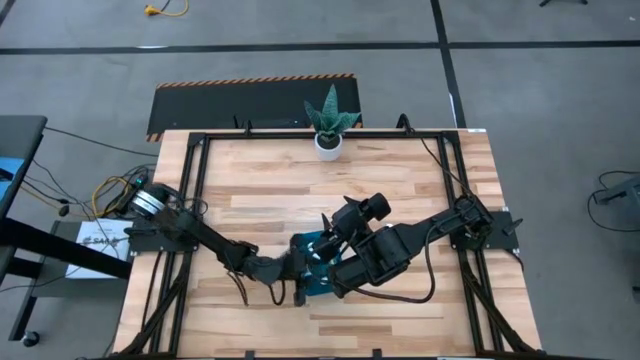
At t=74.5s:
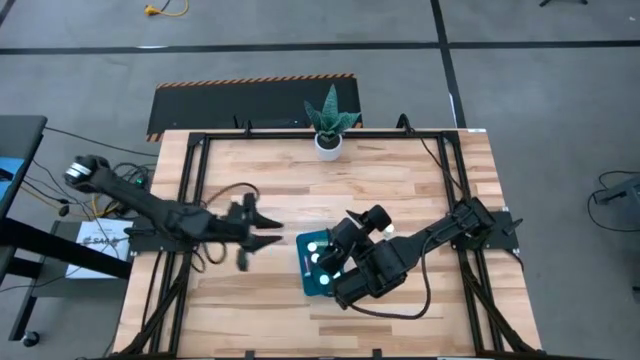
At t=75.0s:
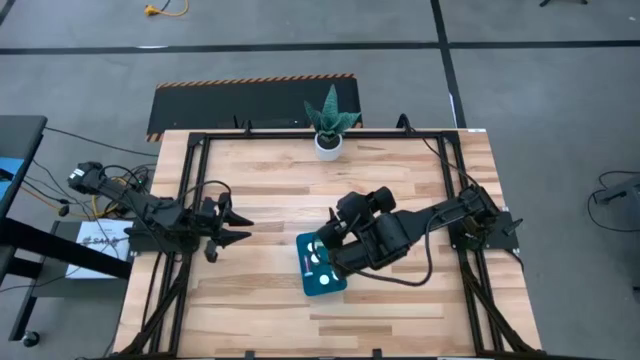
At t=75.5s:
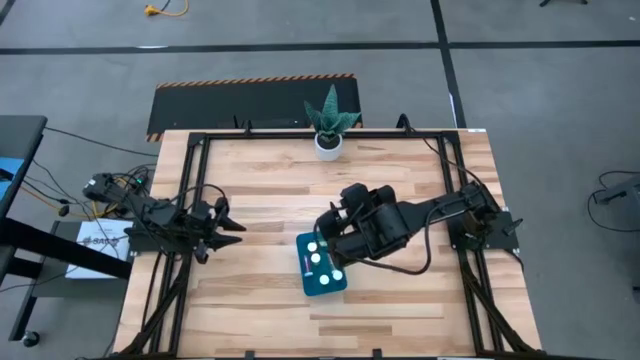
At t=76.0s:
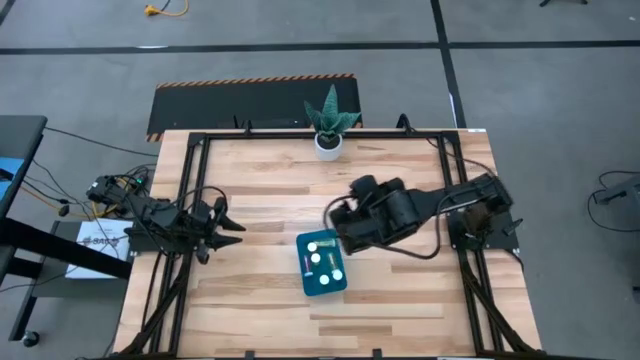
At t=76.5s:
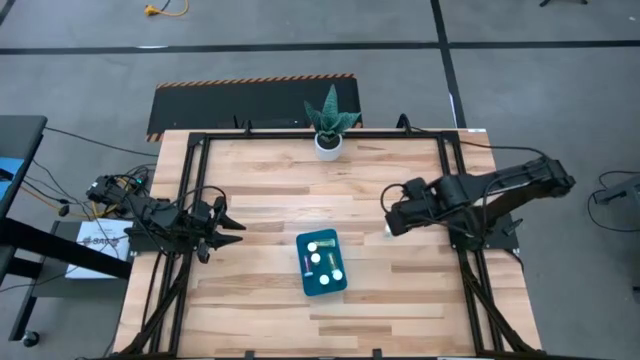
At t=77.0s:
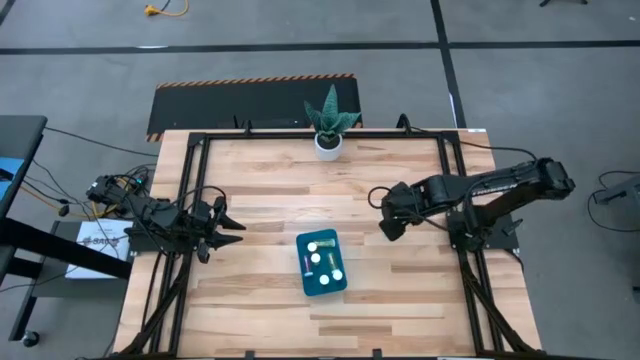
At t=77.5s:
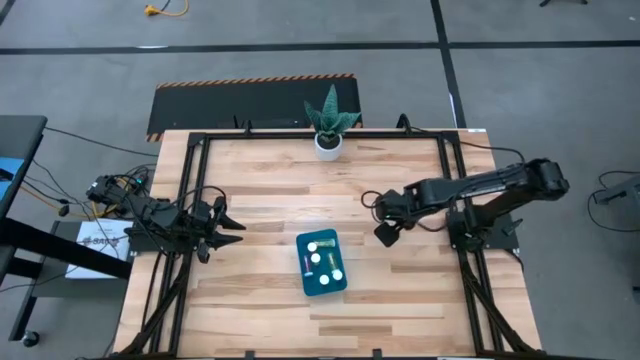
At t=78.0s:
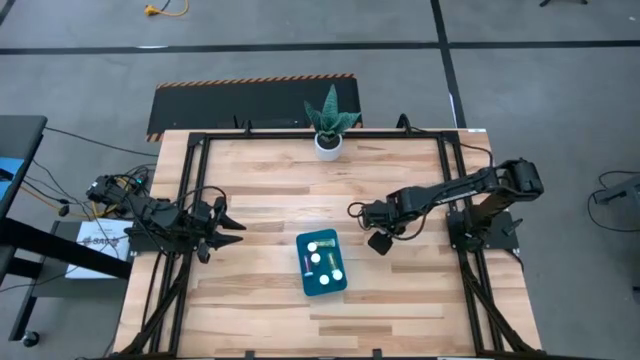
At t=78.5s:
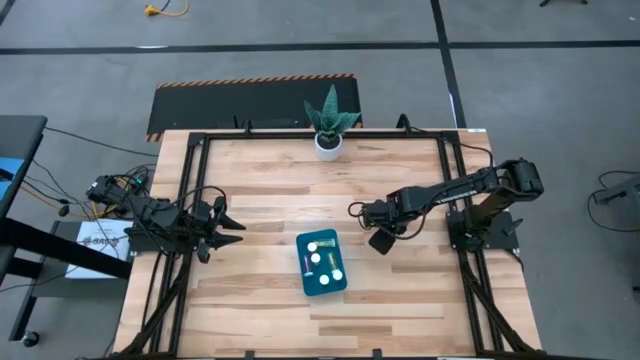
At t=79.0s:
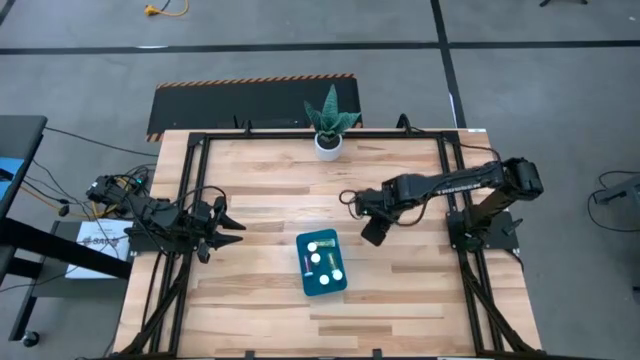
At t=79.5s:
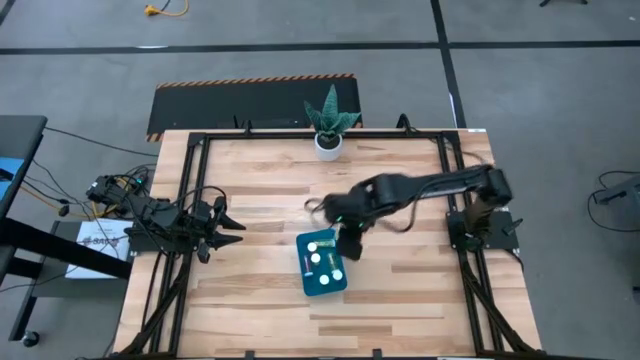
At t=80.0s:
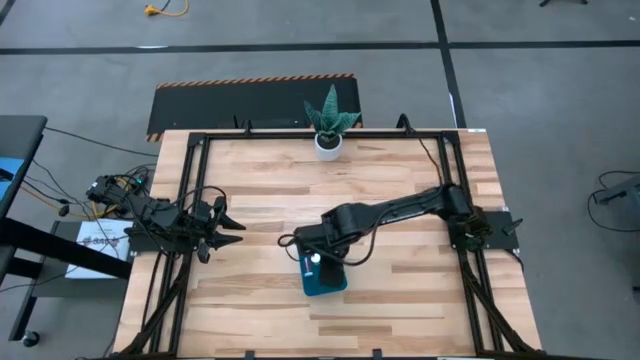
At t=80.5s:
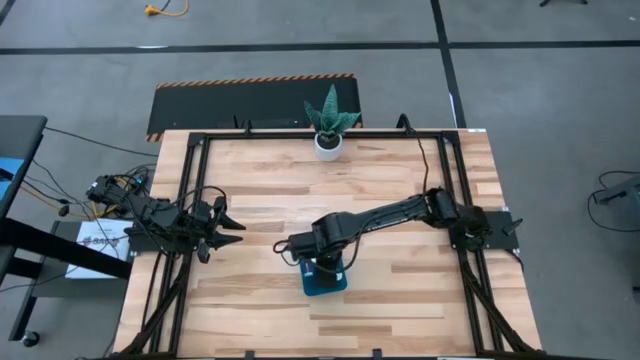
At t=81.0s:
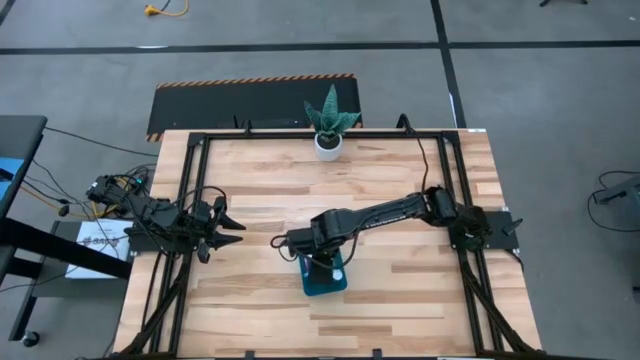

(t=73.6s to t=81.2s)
Task: Pick and place pill bottles into a basket
Put the blue pill bottle into the blue bin

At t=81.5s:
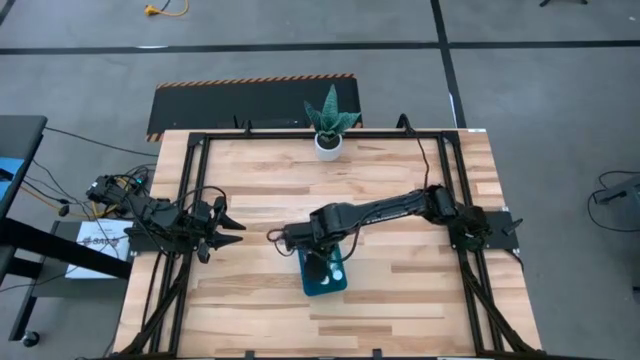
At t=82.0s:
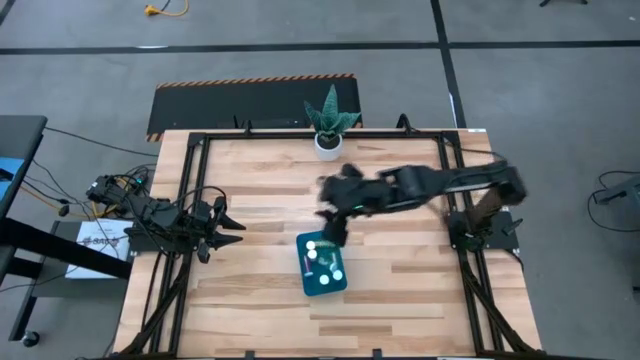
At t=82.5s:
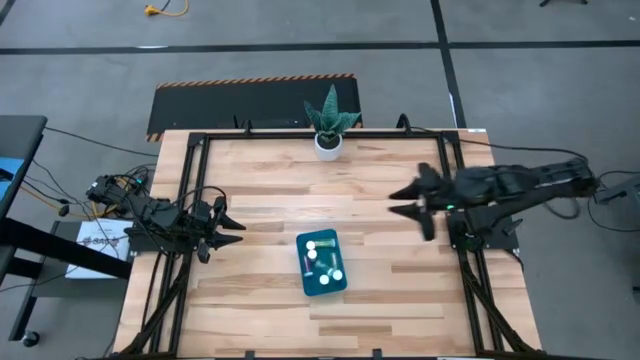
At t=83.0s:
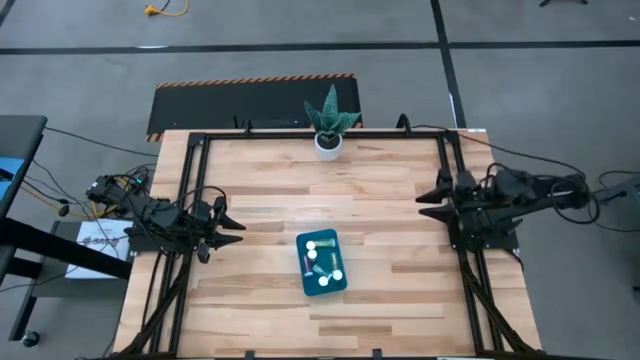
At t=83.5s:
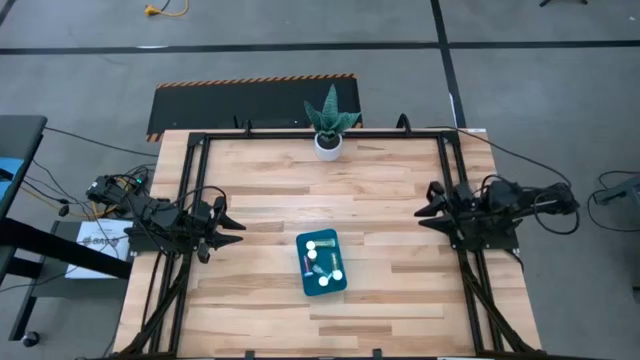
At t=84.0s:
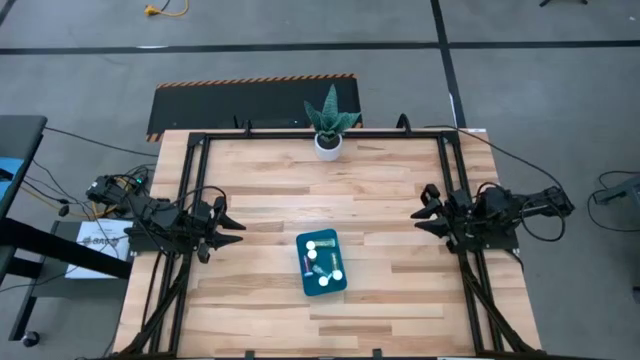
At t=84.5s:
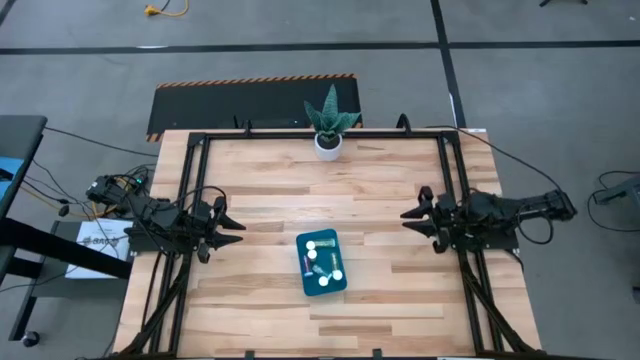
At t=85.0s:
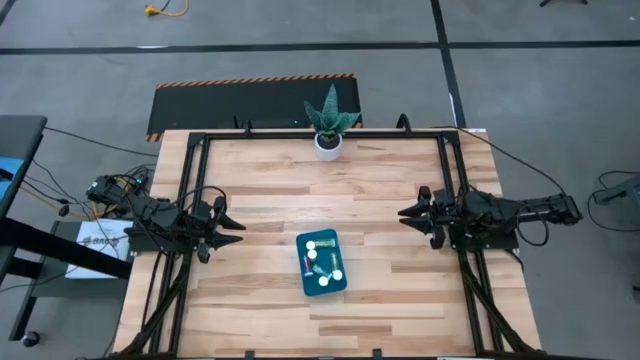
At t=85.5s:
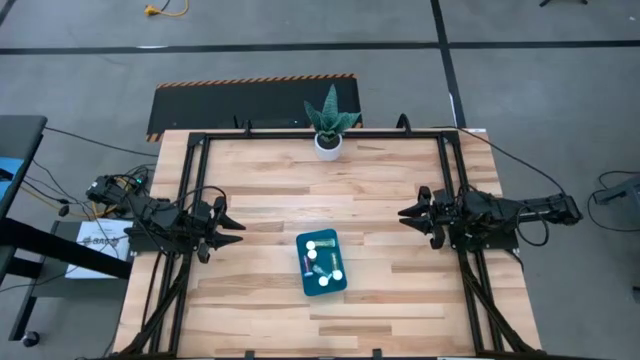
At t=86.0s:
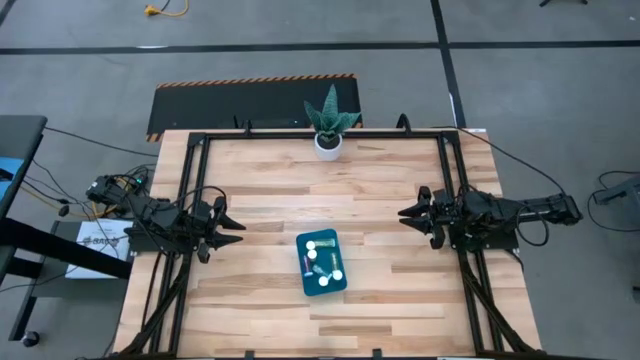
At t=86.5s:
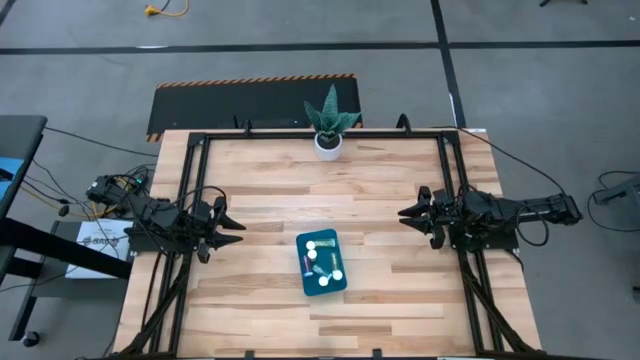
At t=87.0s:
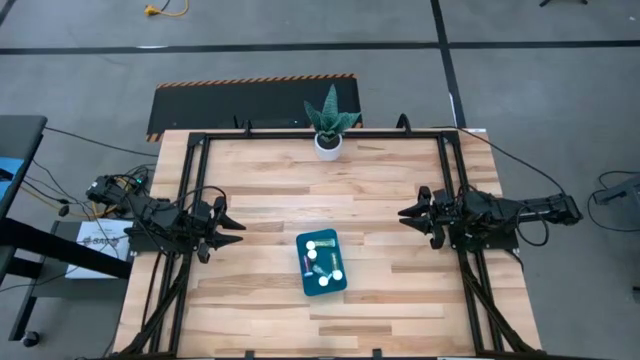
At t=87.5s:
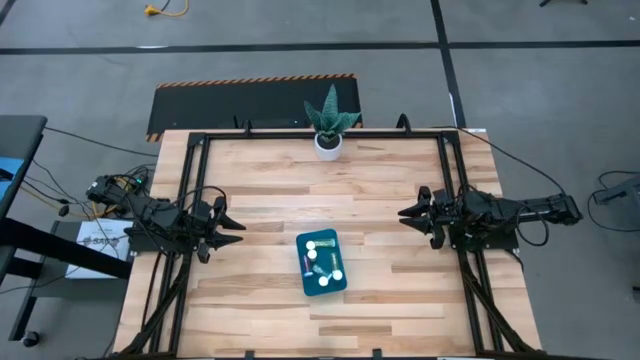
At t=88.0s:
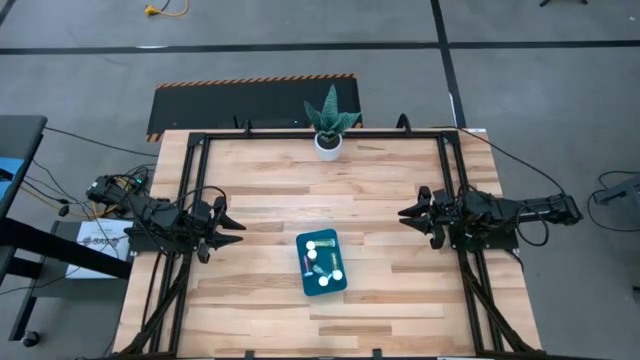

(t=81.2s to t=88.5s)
Return to Home Position

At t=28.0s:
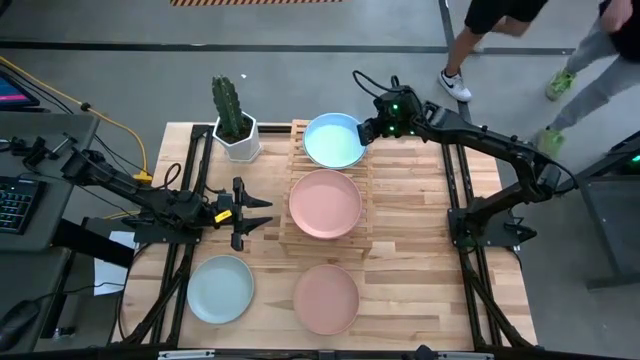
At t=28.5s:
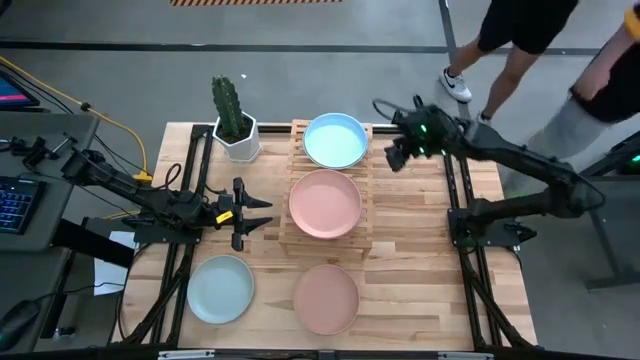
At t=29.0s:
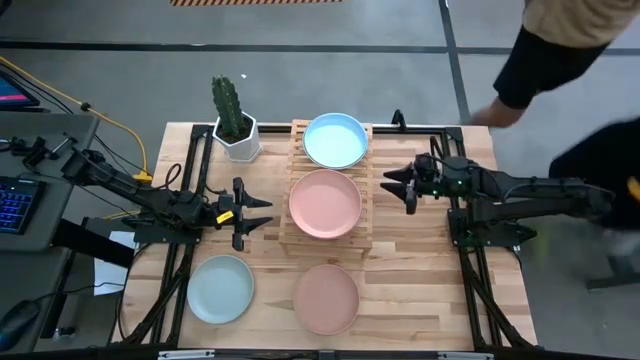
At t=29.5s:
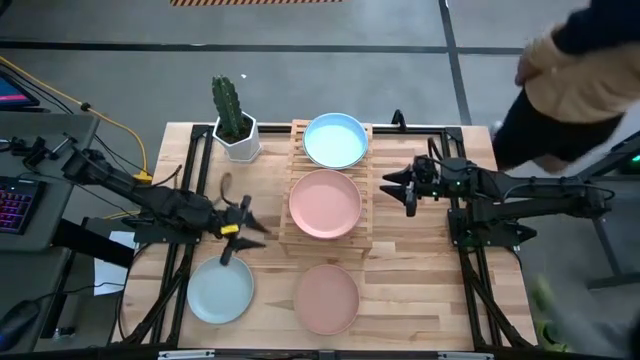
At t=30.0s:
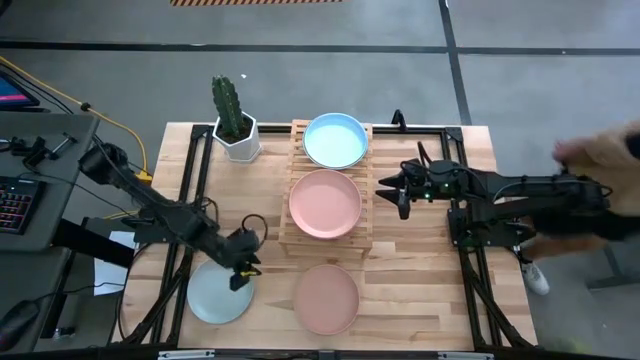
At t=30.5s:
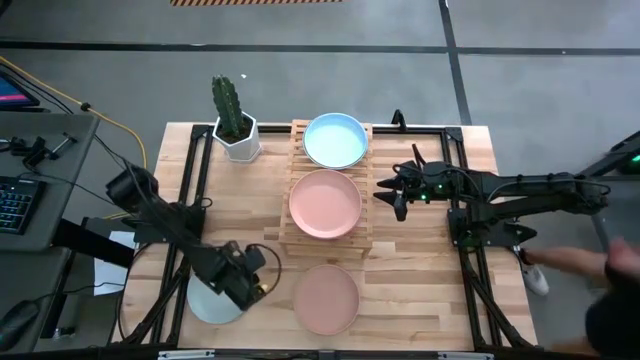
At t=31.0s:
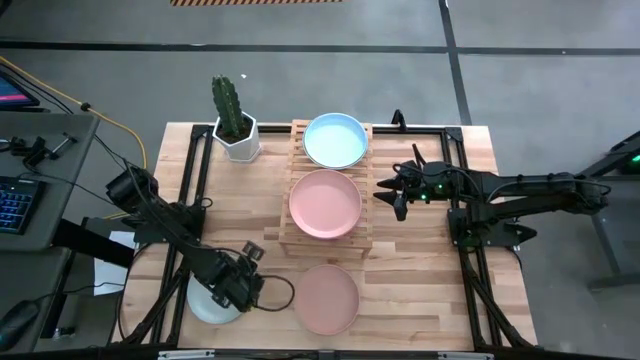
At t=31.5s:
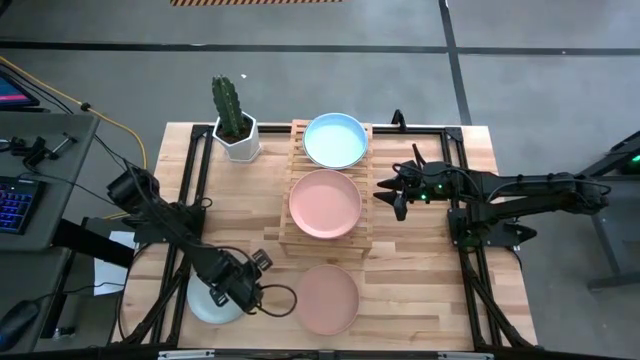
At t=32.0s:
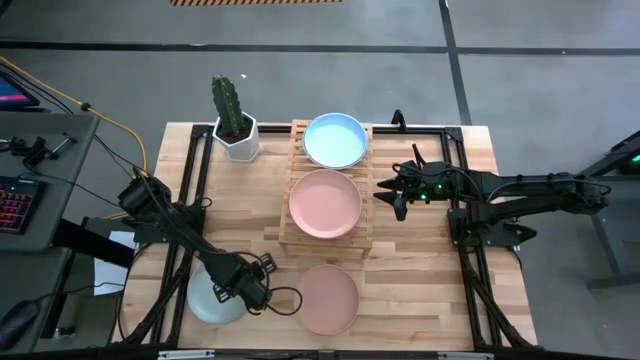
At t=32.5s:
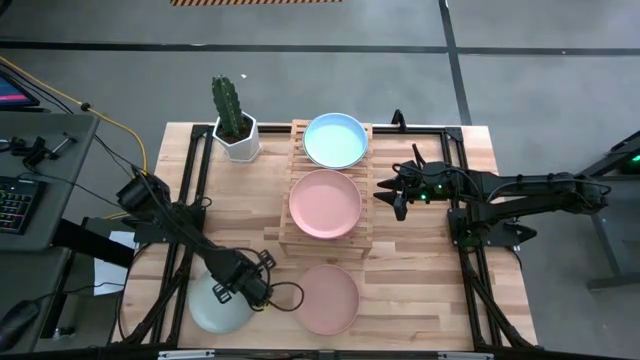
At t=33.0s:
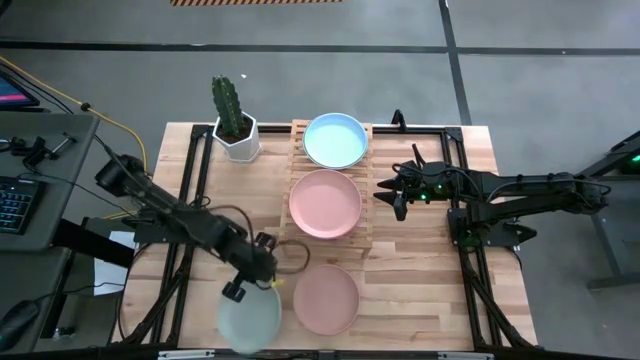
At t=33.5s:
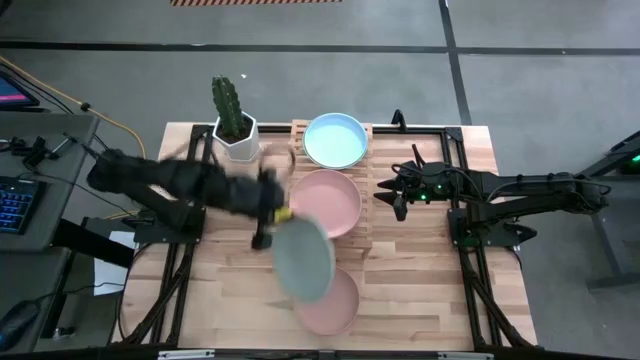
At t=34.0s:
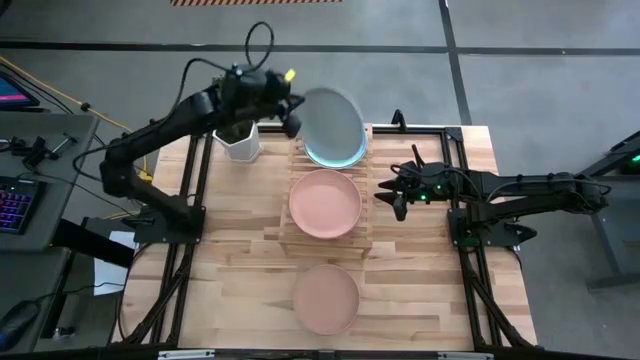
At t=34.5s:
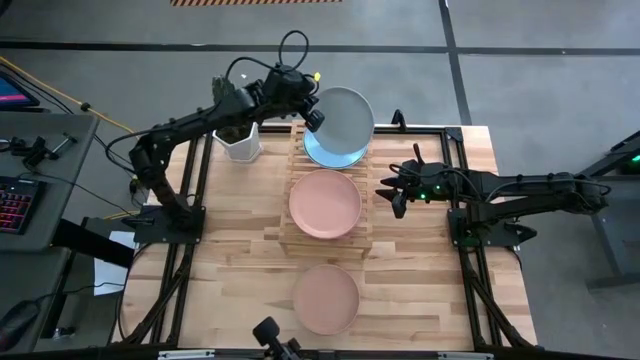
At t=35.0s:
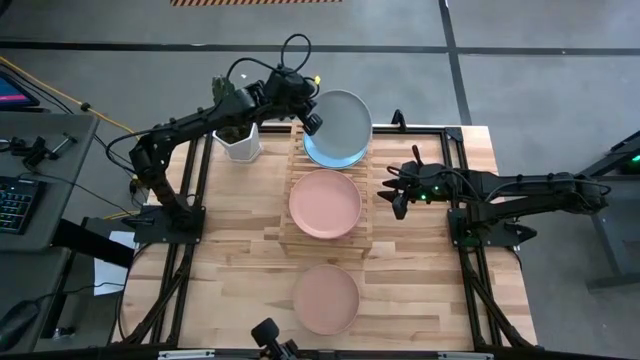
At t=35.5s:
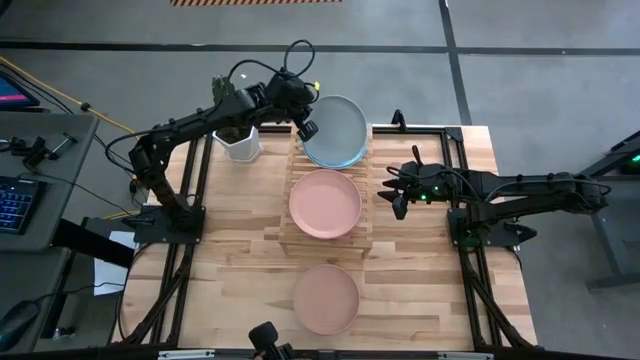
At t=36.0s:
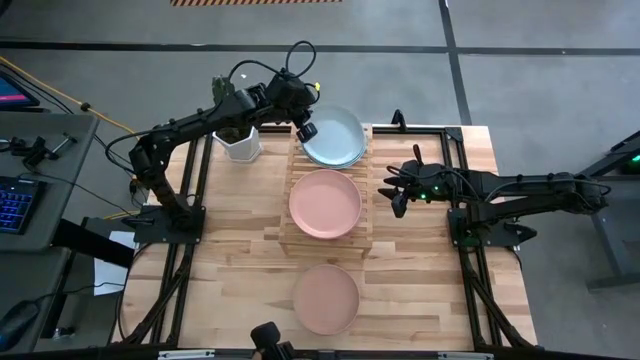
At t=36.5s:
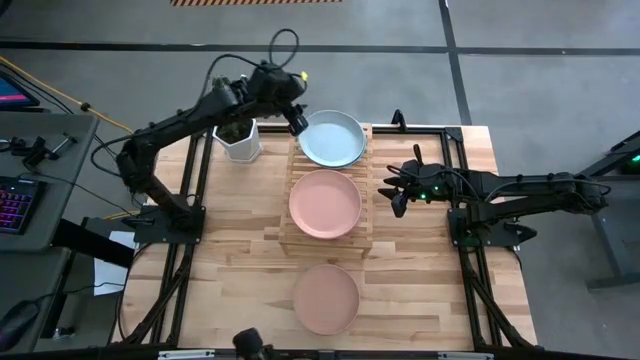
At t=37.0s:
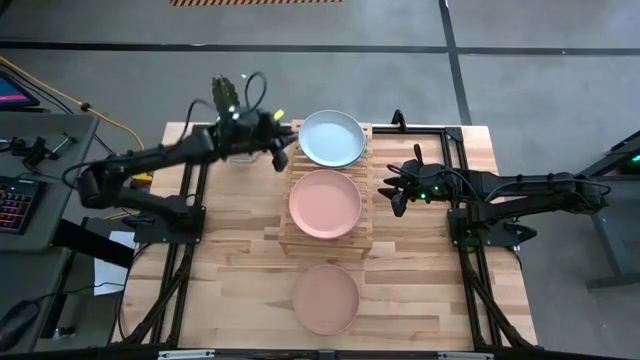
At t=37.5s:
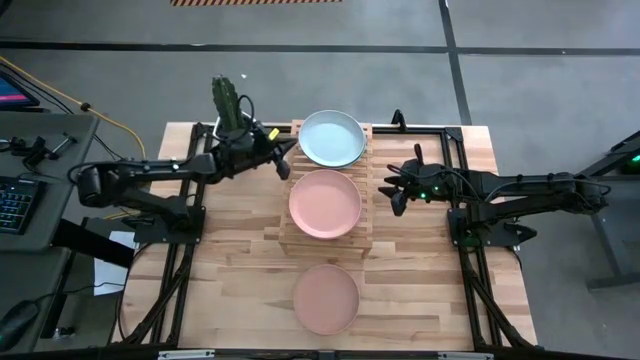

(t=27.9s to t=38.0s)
Task: Place and stack plates onto a shelf
Stack the gray plate on the white plate on the shelf
